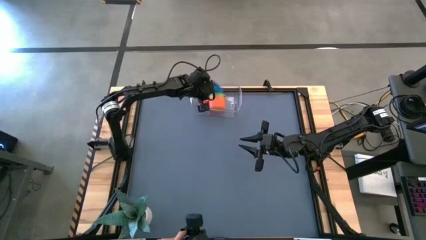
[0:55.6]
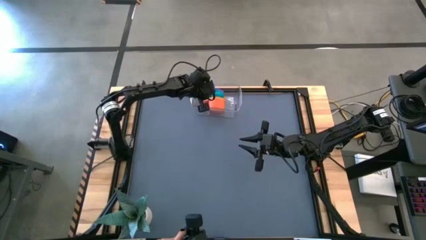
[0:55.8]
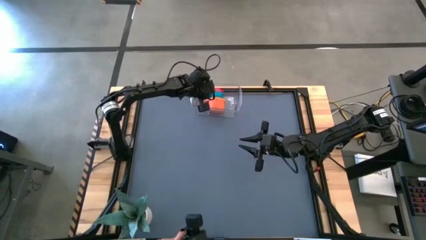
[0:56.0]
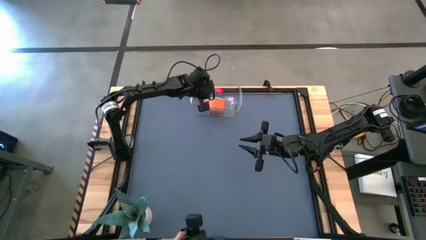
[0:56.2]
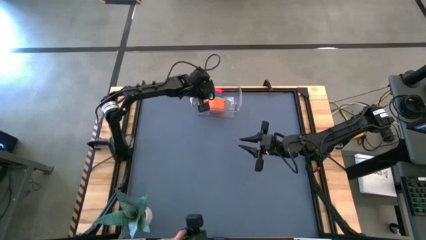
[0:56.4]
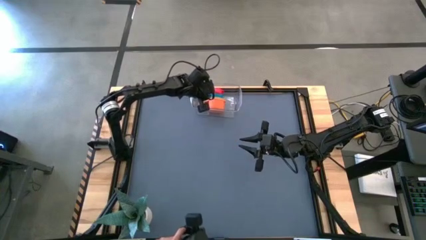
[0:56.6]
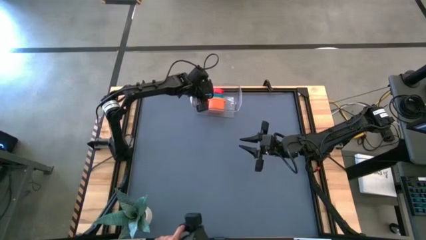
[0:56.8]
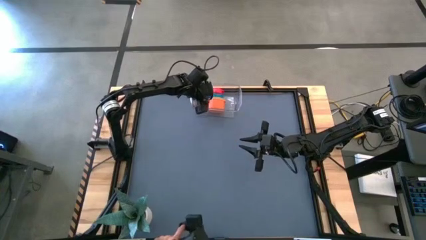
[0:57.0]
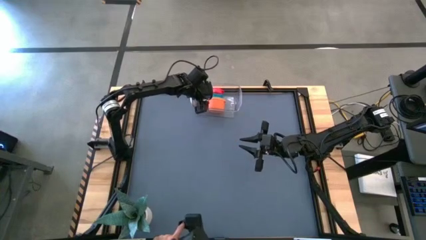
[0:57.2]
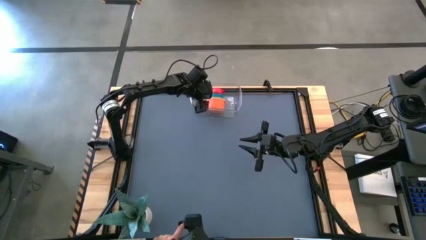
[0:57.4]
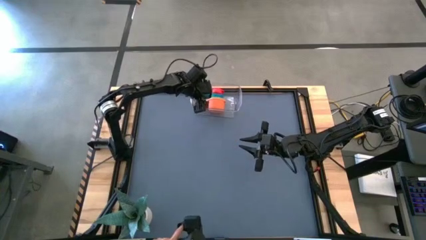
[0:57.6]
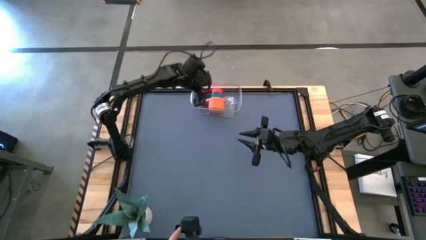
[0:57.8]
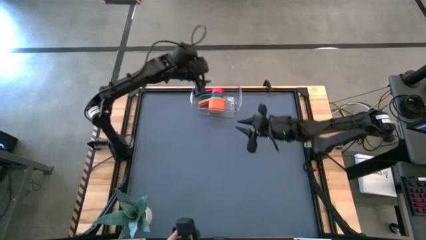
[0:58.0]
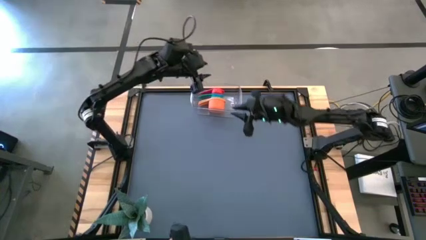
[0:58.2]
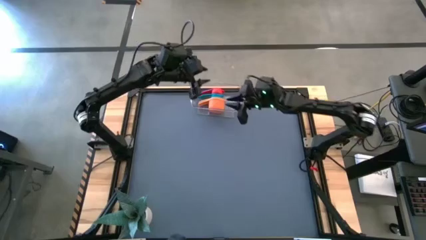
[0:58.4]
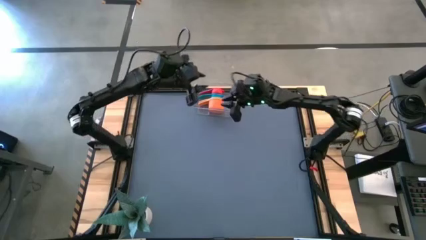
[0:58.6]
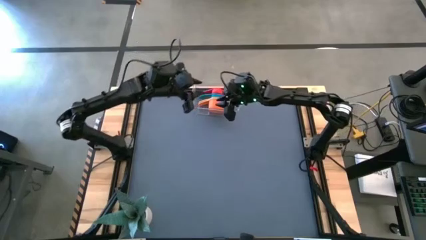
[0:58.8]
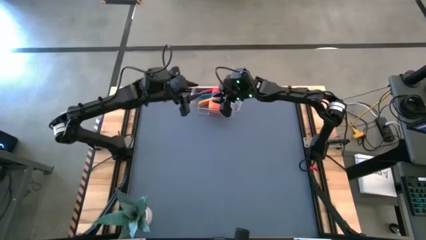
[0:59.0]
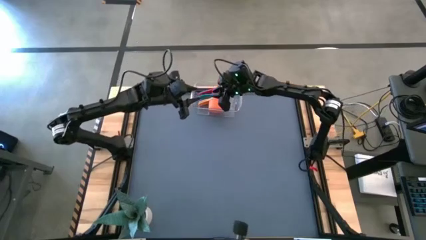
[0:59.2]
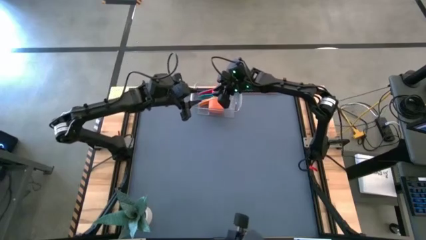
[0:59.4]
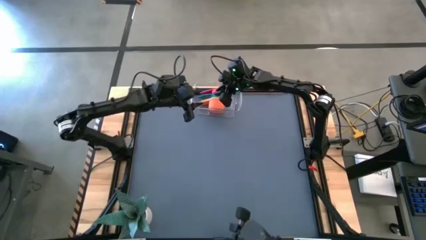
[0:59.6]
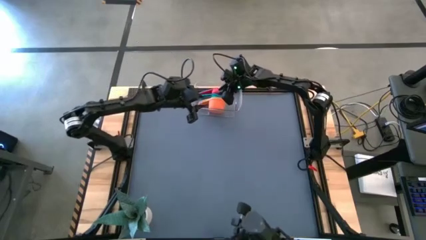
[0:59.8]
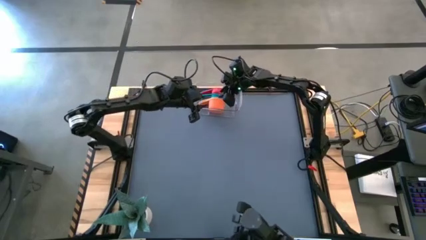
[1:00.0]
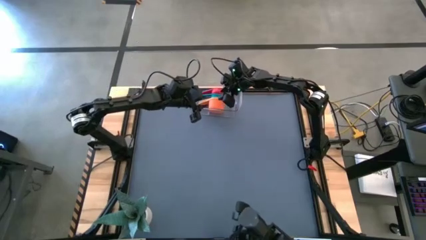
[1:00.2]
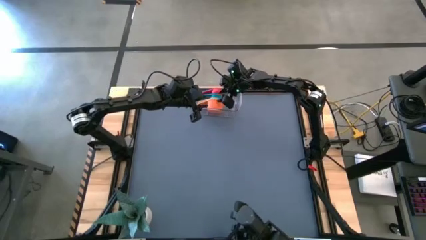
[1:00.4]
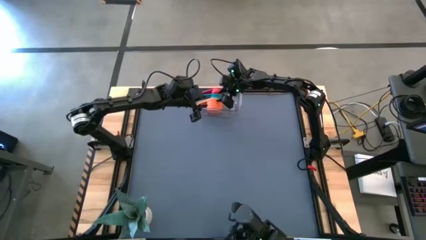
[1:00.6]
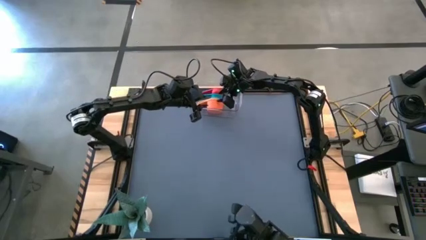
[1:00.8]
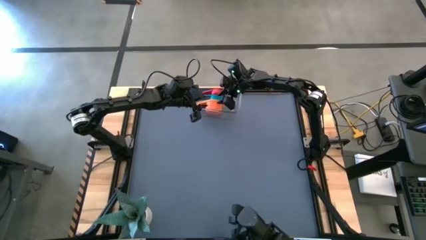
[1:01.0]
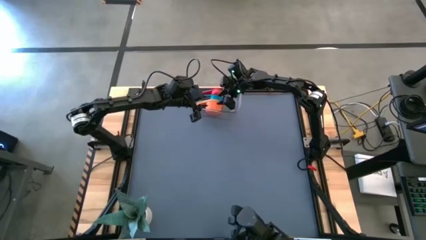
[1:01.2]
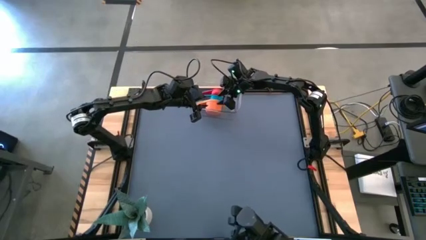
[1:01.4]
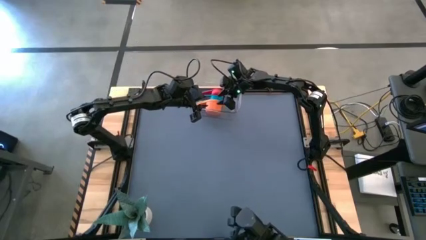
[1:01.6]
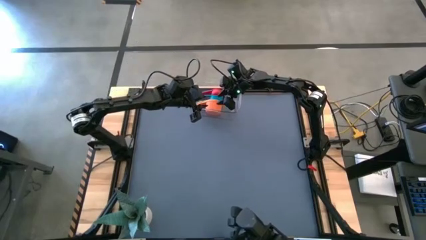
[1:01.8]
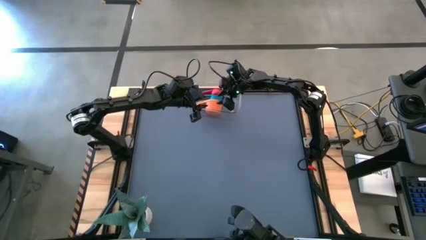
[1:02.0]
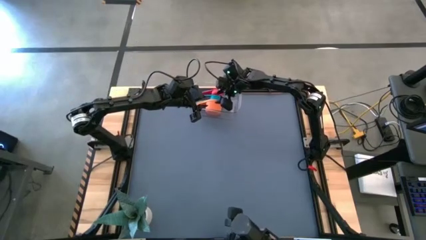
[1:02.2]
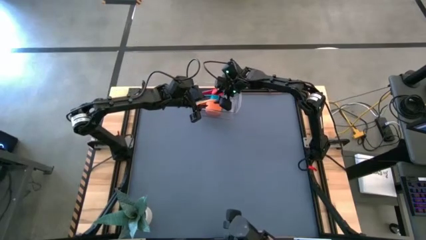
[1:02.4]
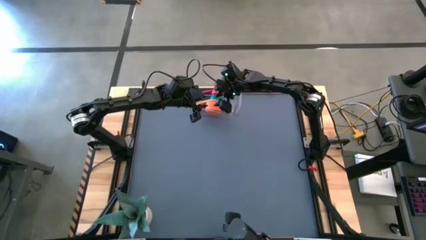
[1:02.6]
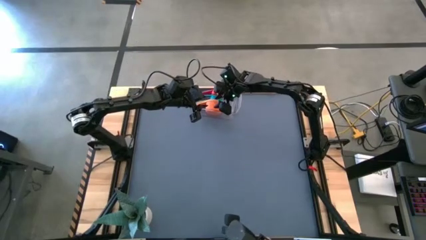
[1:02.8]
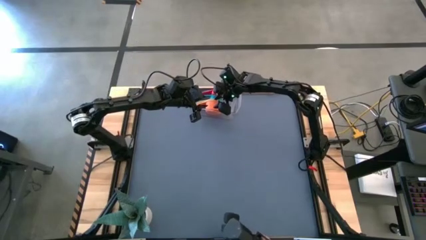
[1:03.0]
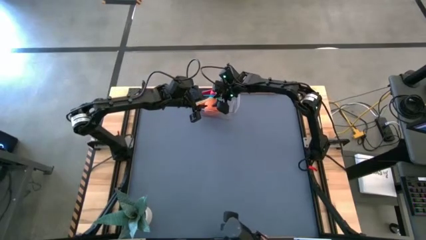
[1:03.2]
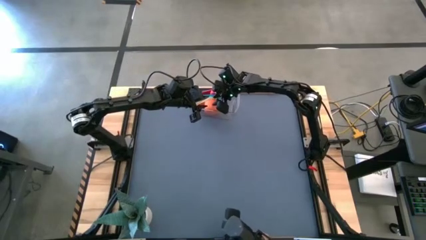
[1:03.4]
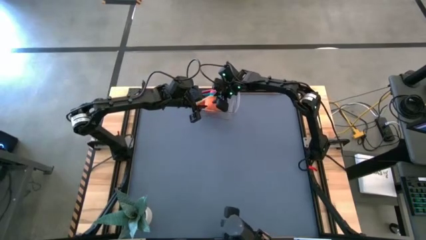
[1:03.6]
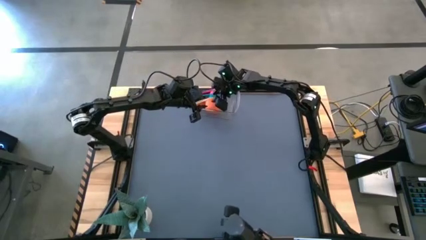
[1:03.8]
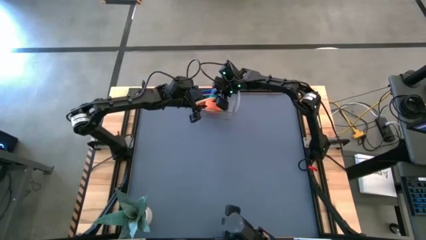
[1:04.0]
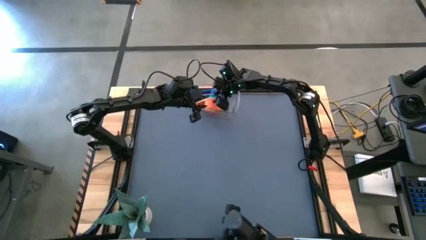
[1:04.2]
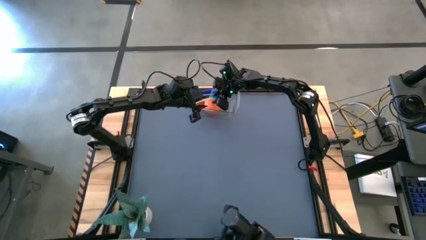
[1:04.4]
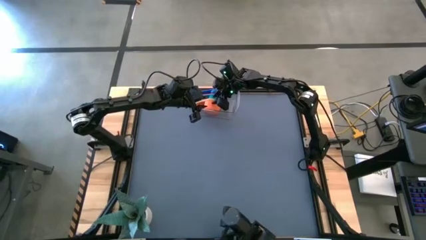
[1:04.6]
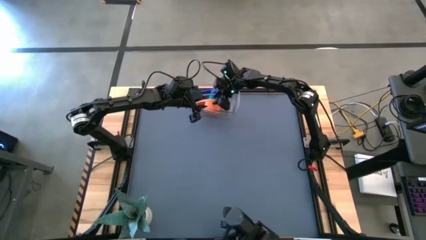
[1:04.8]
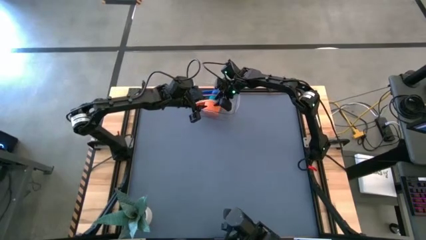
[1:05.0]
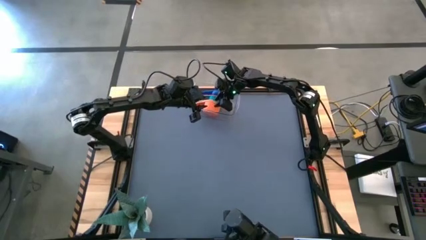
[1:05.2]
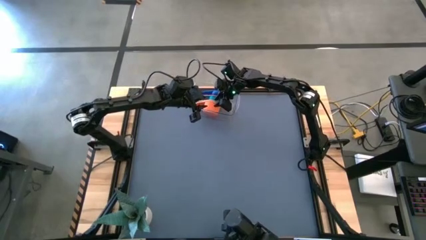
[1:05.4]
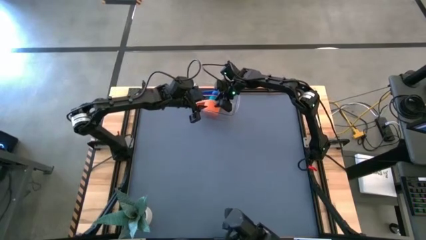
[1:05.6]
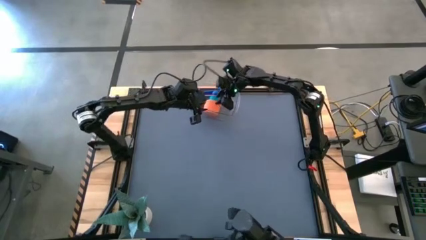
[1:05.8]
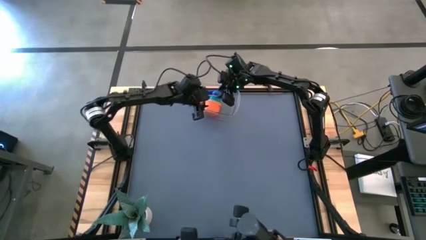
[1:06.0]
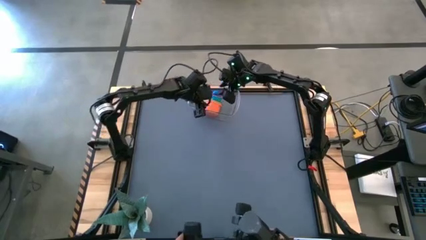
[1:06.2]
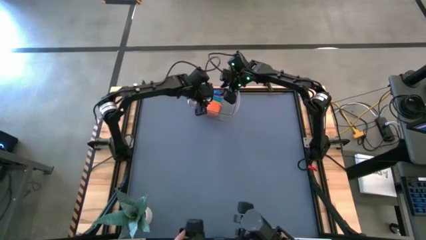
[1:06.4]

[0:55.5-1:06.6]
Task: Nest measuring cups in basket
Remove the stacked measuring cups from the transparent bin

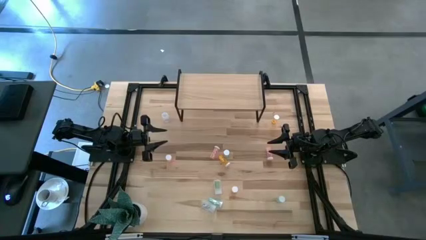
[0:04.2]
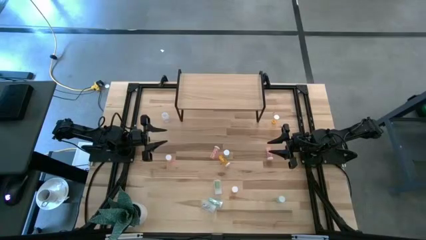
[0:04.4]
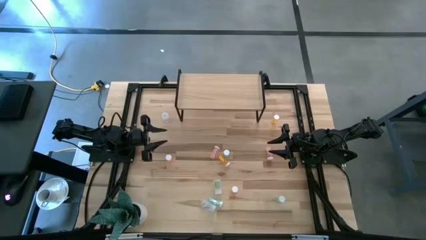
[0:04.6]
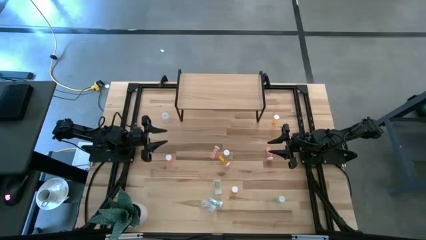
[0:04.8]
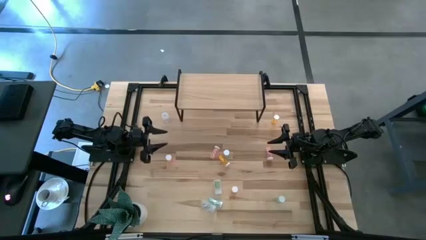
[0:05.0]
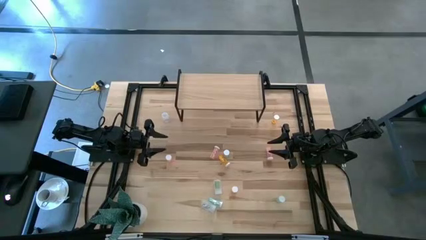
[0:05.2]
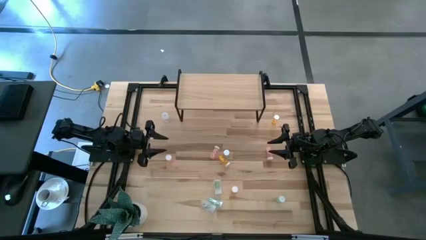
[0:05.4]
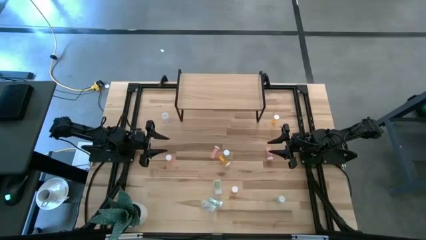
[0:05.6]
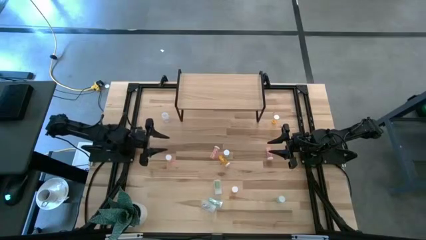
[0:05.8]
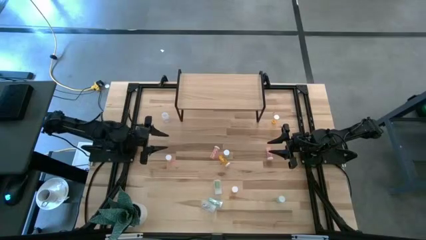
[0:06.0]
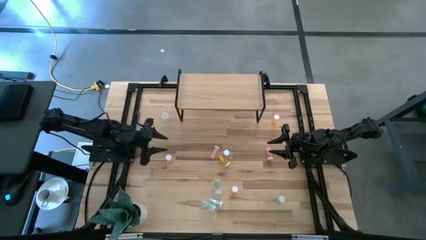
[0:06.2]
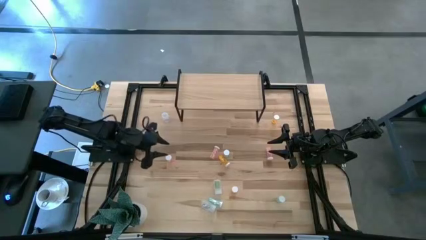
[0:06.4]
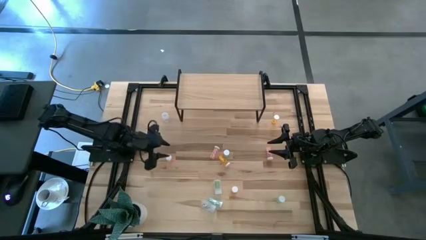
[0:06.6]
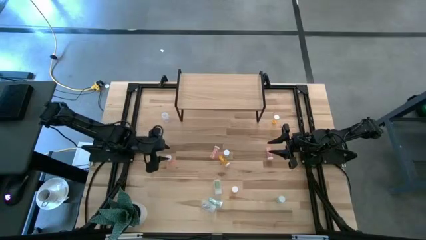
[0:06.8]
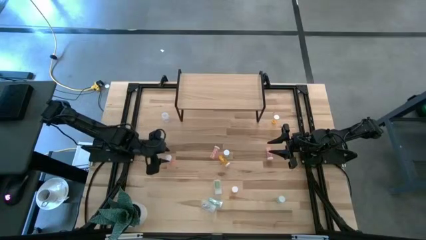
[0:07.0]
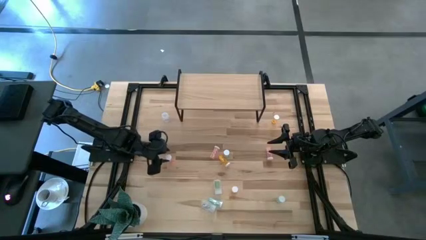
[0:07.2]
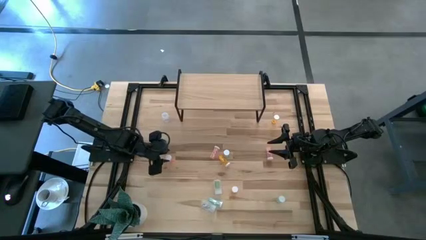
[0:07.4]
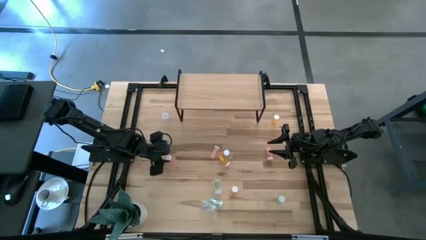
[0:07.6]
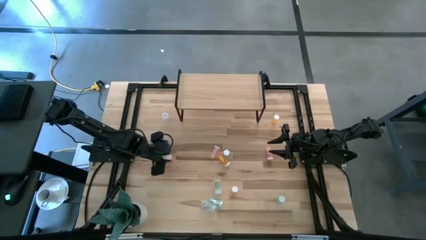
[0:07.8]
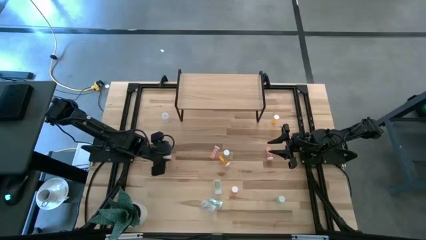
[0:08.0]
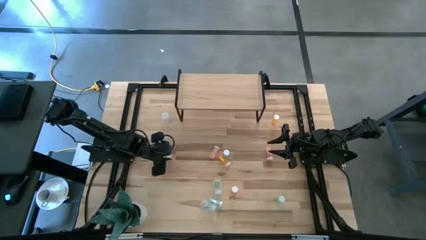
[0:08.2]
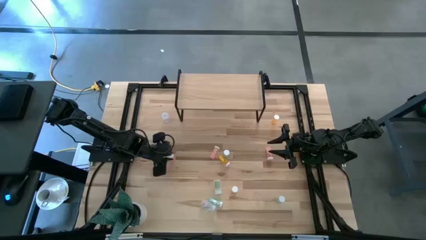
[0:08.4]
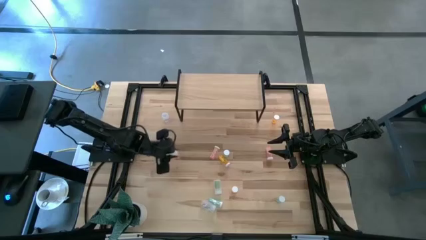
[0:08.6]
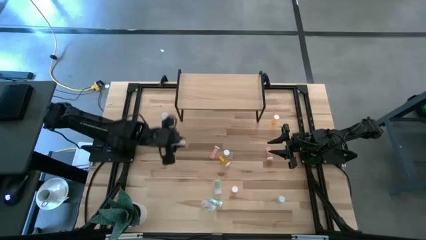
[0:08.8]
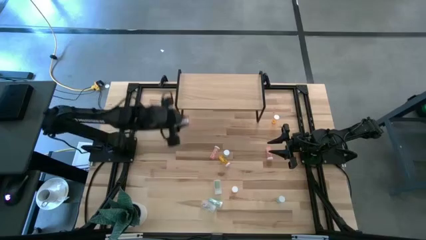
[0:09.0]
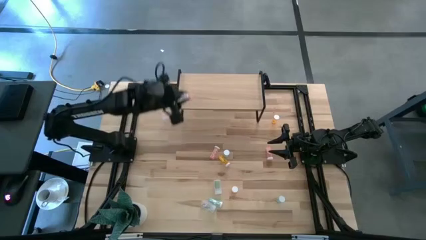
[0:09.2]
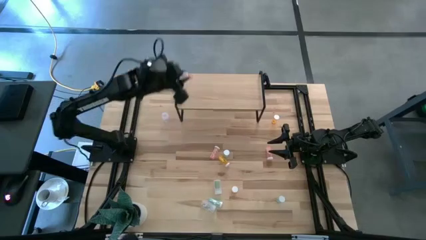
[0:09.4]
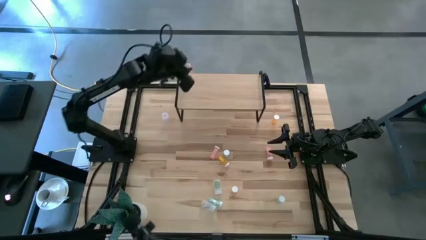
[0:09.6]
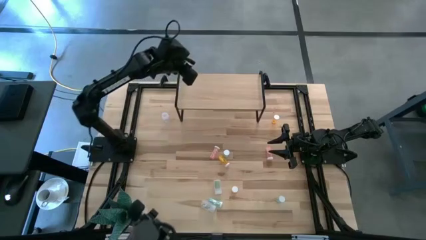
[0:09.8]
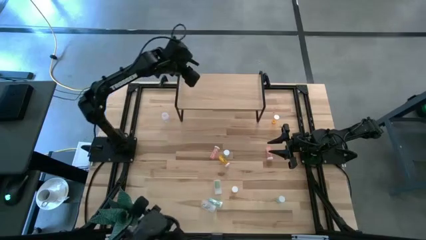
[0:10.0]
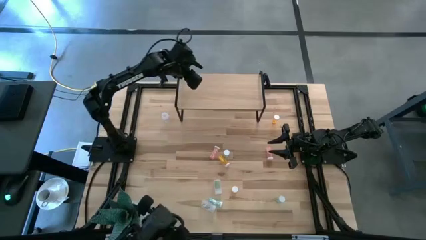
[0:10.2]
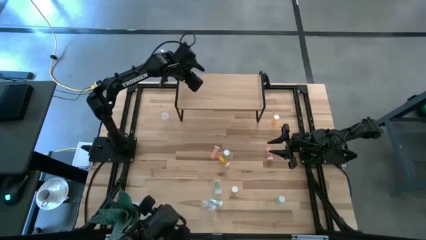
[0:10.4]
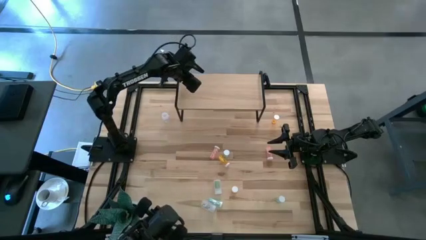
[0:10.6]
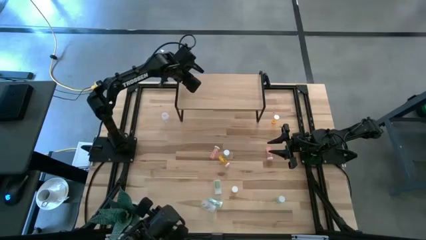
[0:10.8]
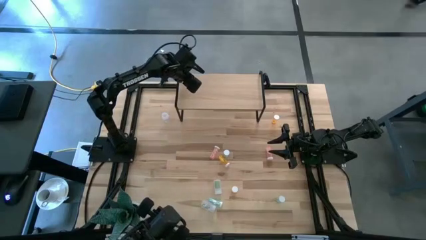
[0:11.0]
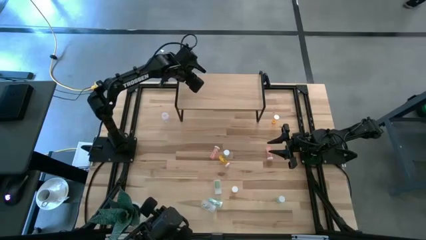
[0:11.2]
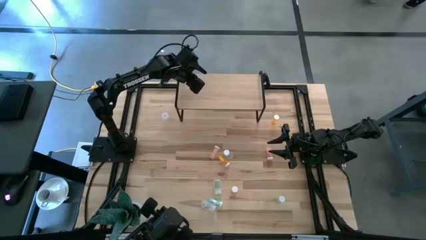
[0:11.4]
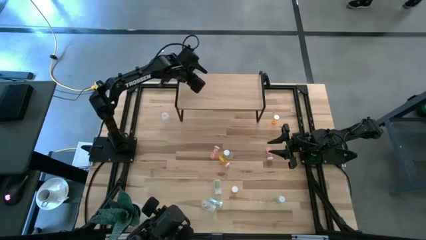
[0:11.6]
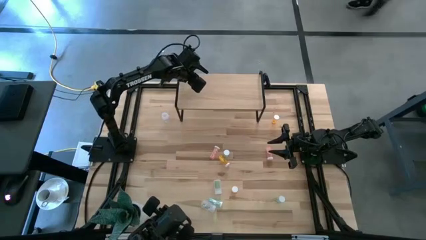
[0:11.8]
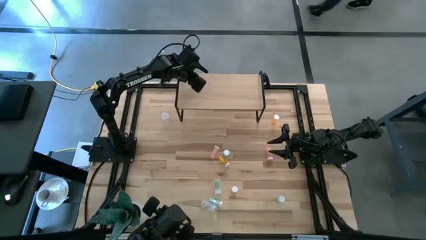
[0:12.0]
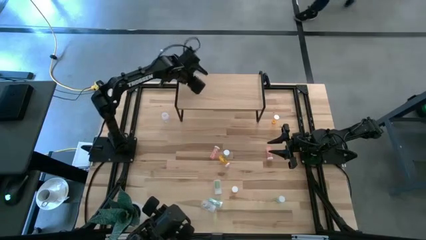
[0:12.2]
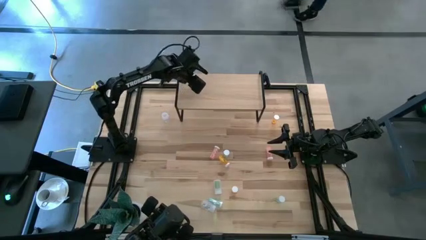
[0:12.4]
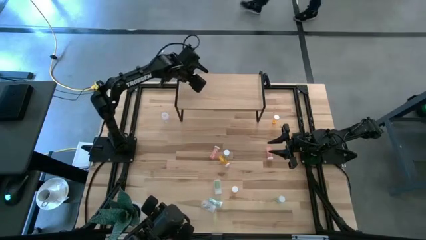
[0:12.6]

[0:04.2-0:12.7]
Task: Pick and place medicine bottles onto shelf by color
Put the left pink pill bottle on the shelf
